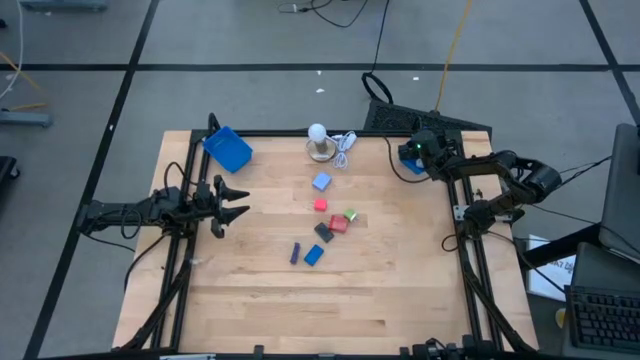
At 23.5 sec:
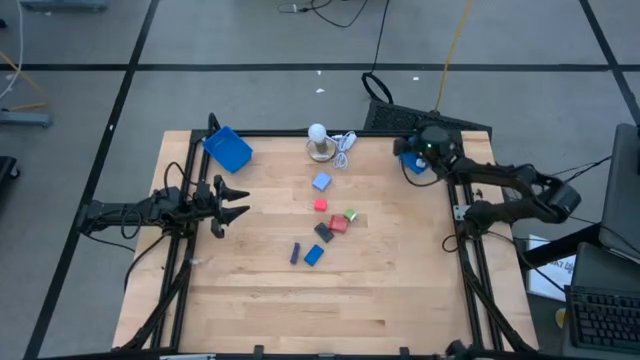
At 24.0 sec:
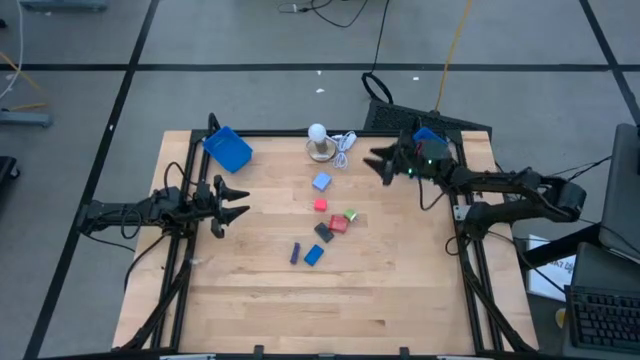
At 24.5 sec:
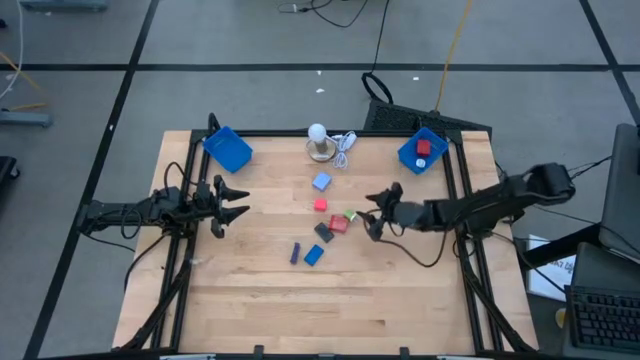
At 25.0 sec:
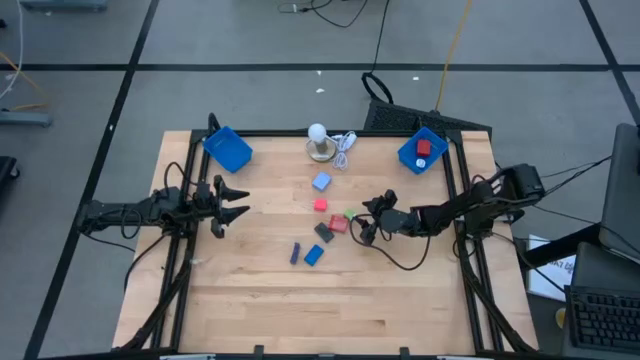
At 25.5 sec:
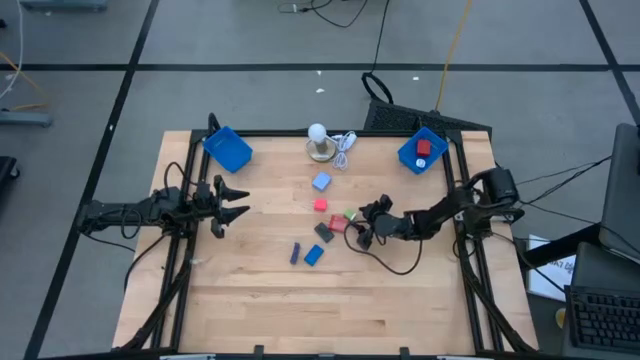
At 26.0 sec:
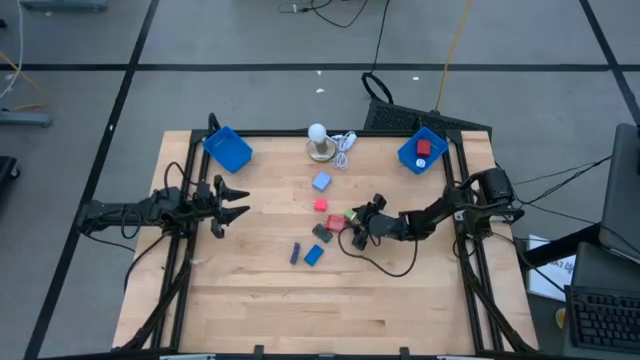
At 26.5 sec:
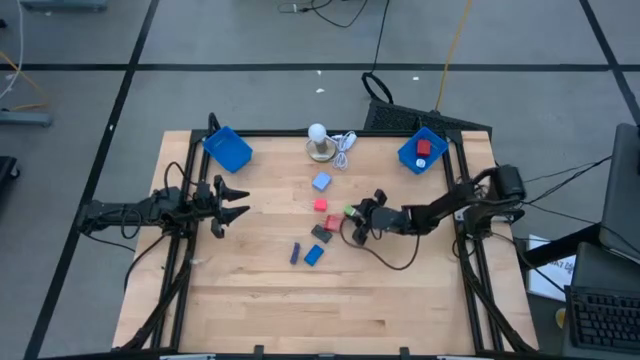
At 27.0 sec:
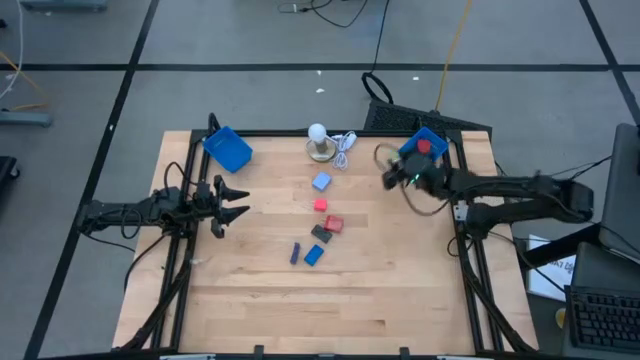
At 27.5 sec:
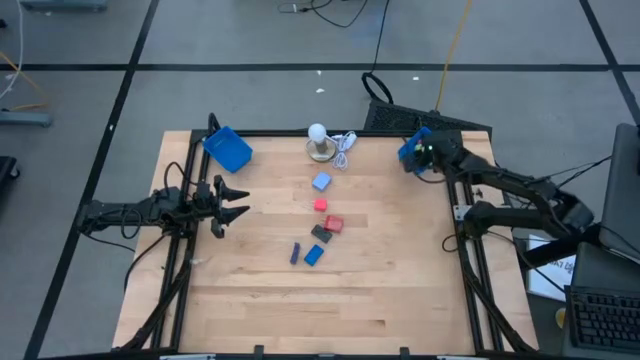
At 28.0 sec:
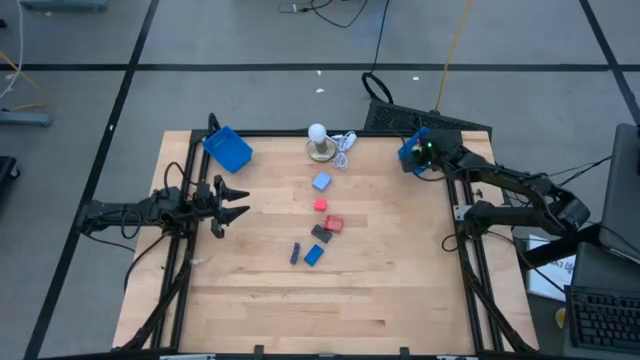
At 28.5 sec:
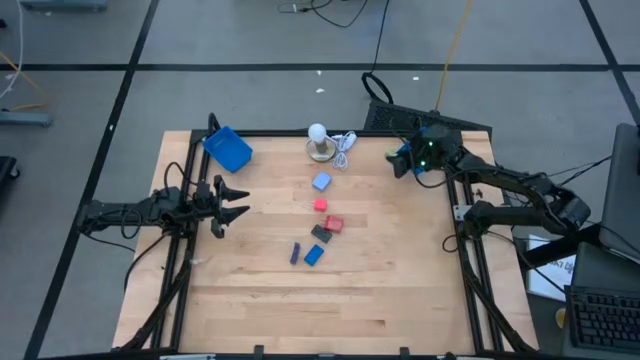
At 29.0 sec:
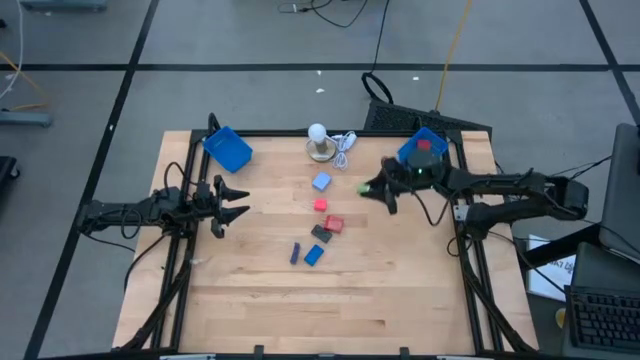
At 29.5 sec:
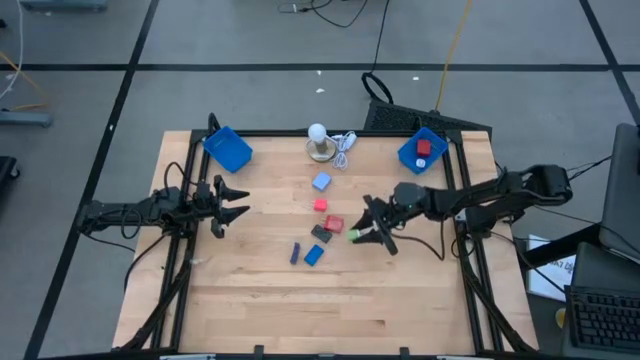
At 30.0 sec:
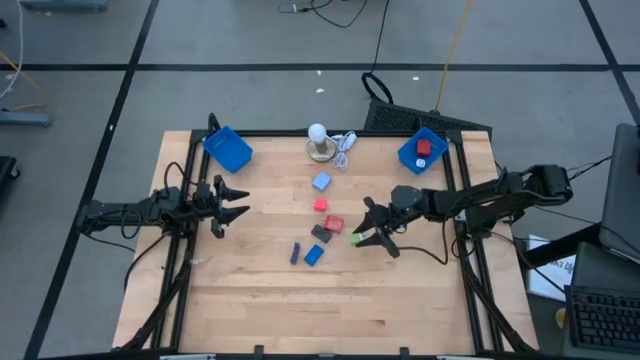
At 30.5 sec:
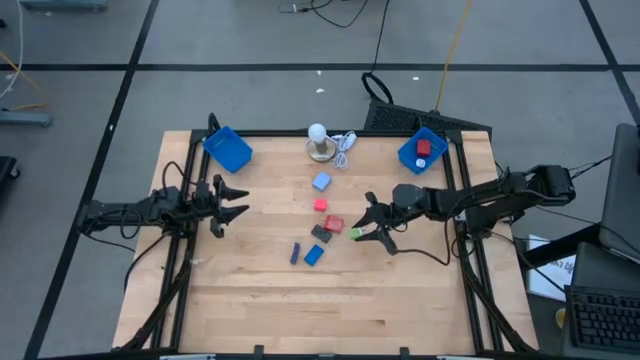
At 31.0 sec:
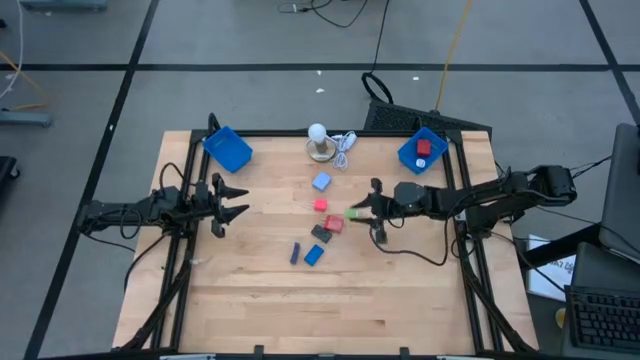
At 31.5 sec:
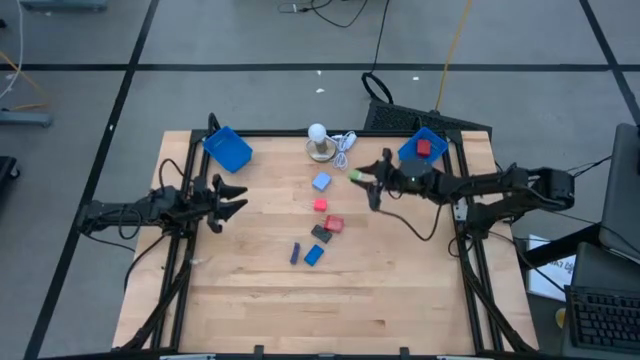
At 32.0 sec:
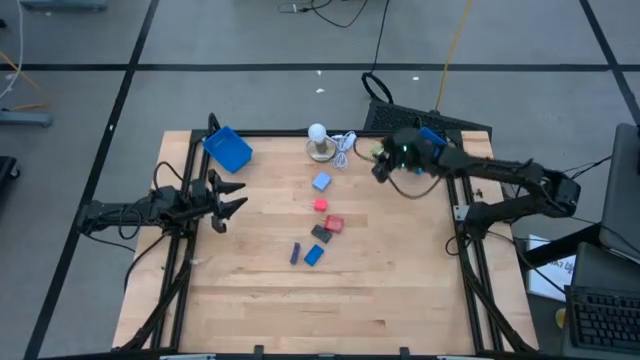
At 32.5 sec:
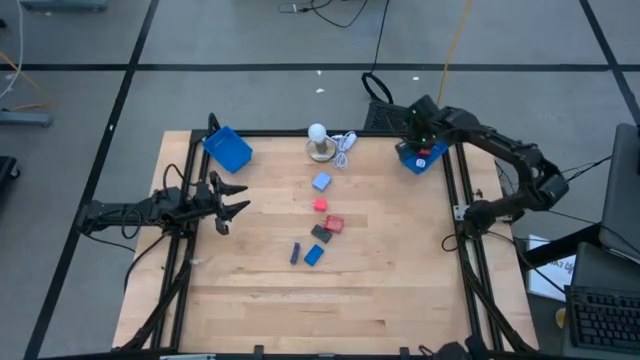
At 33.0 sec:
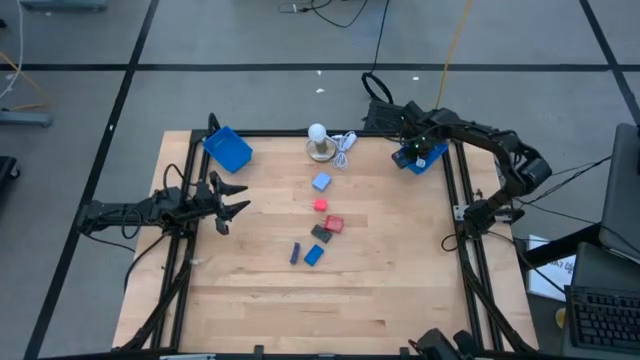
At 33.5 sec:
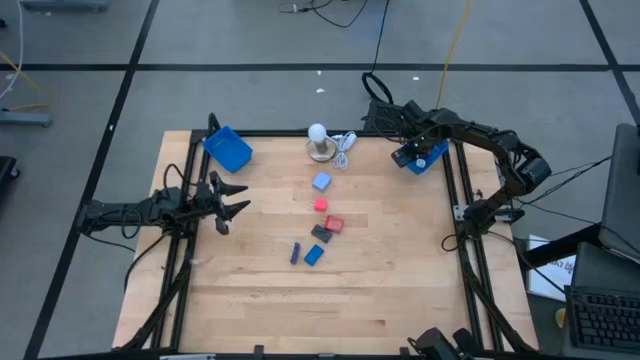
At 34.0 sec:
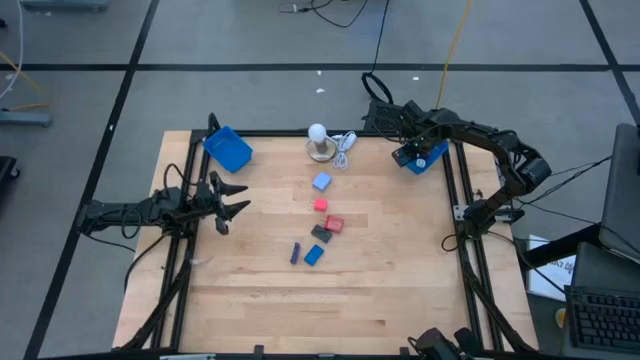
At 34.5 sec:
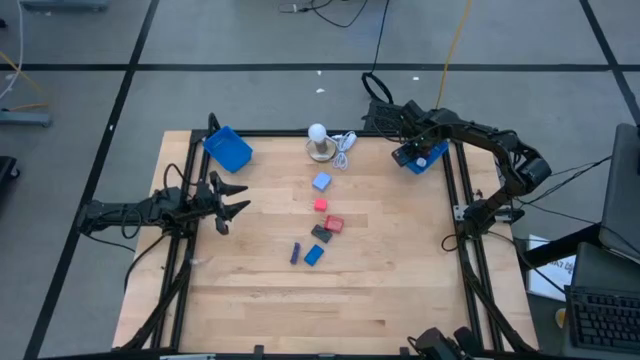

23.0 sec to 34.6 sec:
Task: Pick & Place Office items
Put the green charger adapter into the right blue bin

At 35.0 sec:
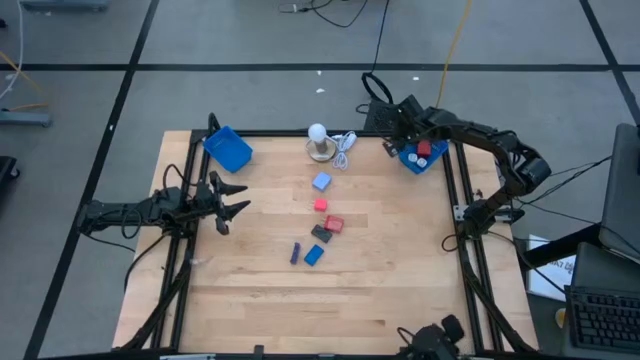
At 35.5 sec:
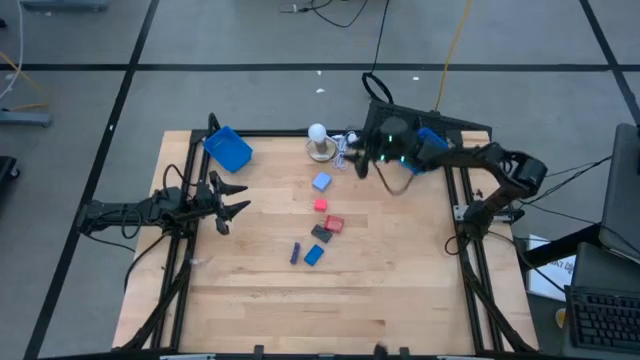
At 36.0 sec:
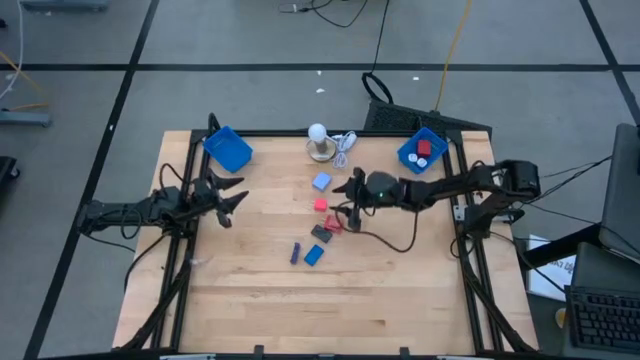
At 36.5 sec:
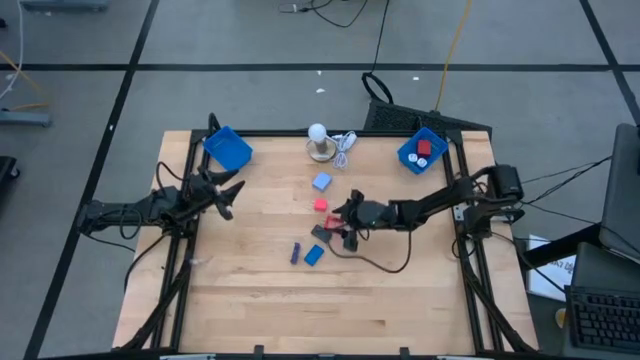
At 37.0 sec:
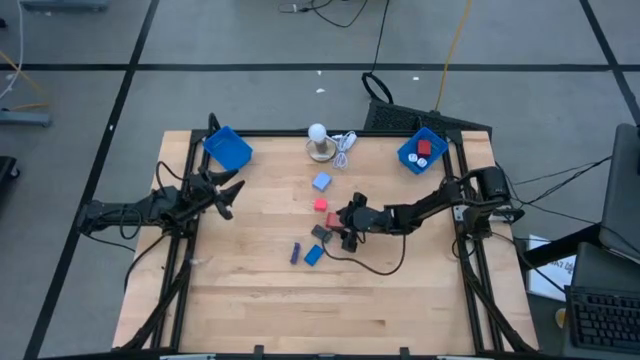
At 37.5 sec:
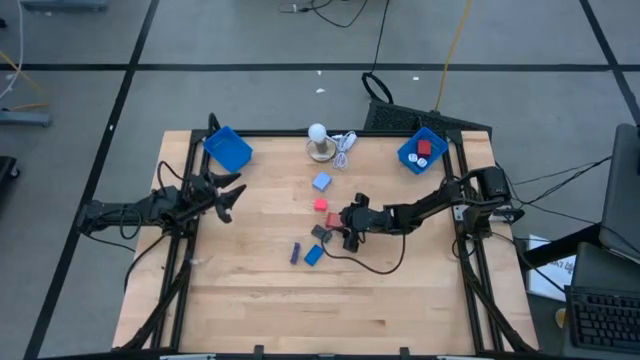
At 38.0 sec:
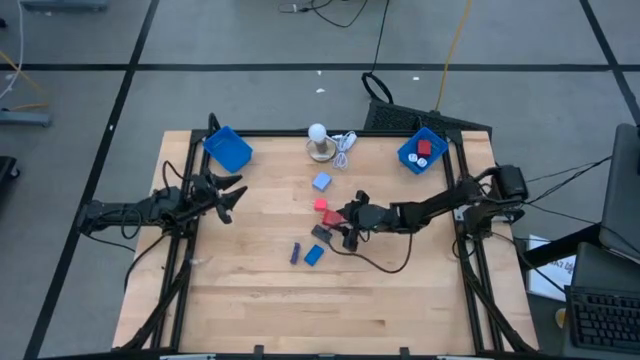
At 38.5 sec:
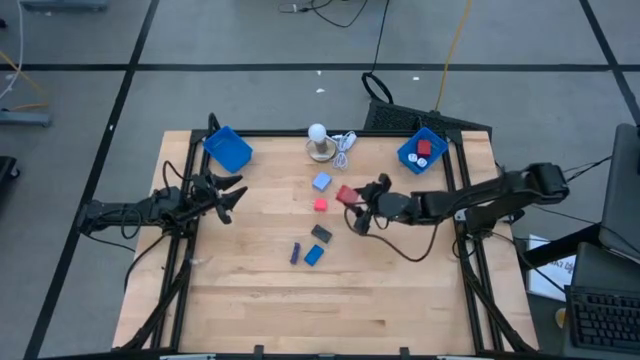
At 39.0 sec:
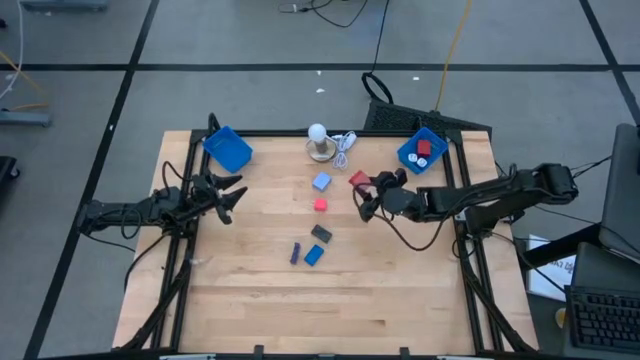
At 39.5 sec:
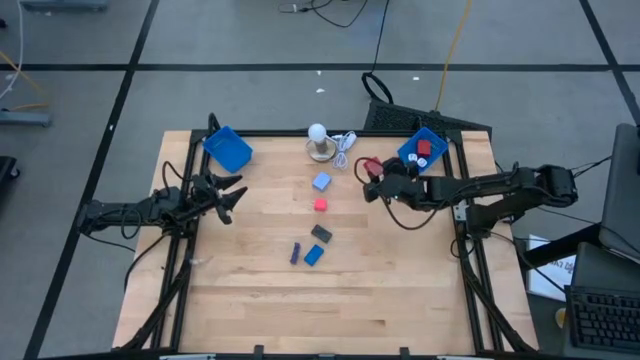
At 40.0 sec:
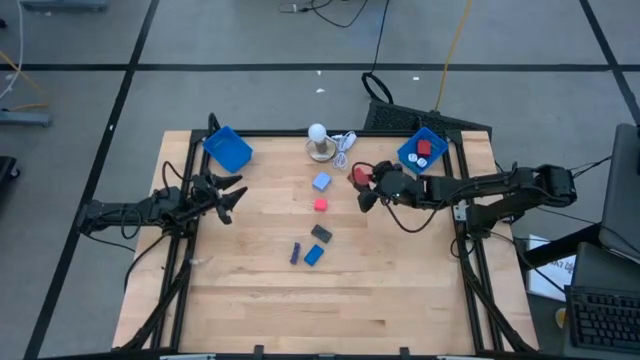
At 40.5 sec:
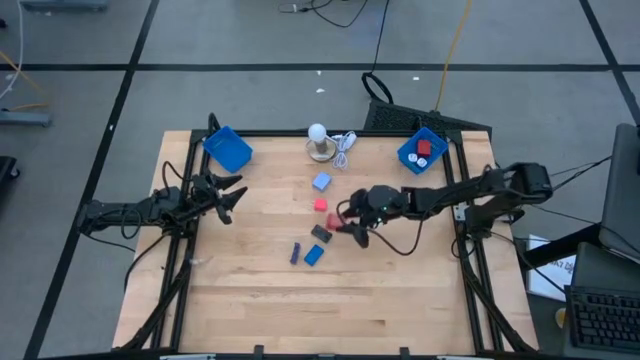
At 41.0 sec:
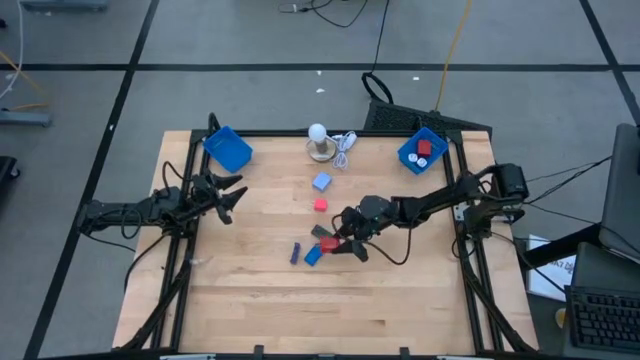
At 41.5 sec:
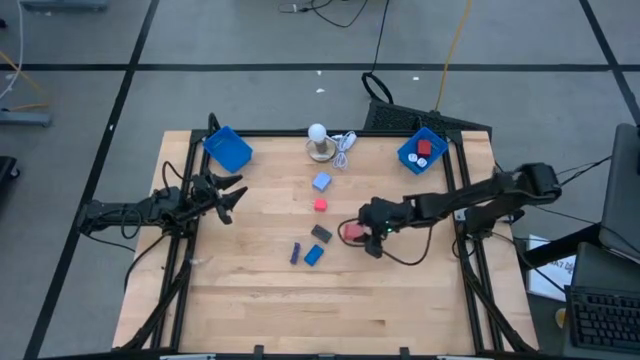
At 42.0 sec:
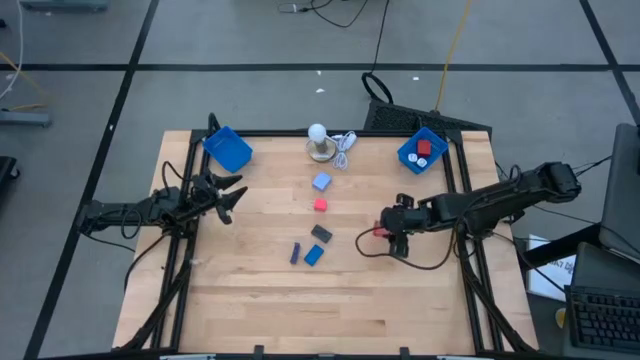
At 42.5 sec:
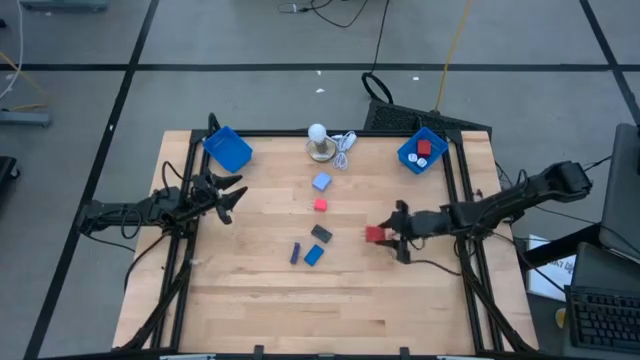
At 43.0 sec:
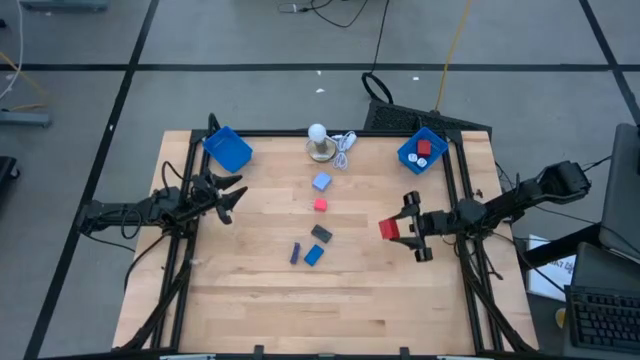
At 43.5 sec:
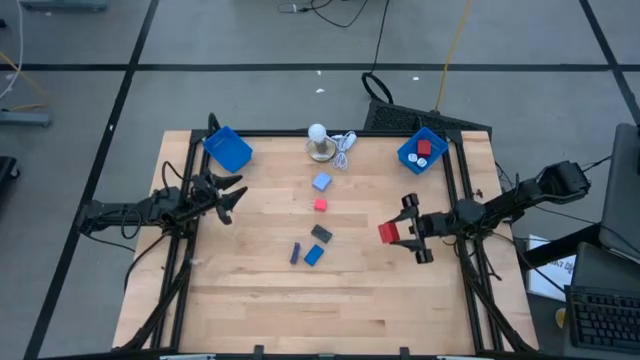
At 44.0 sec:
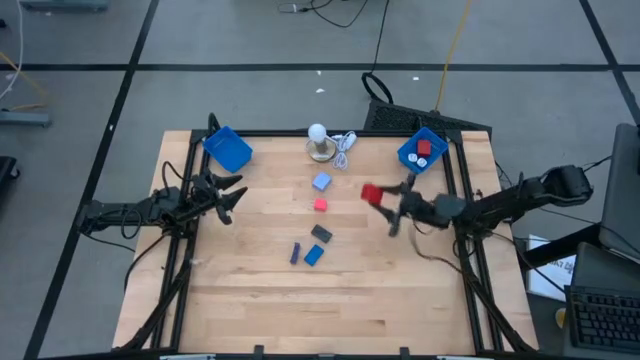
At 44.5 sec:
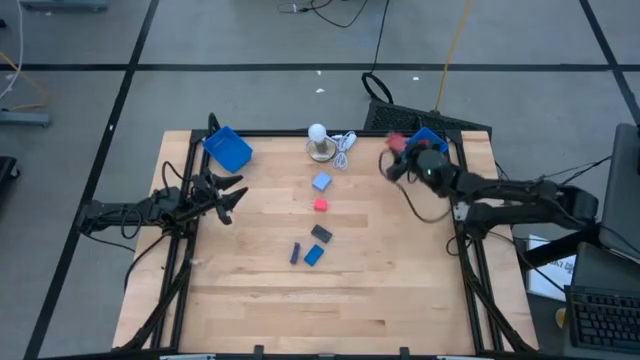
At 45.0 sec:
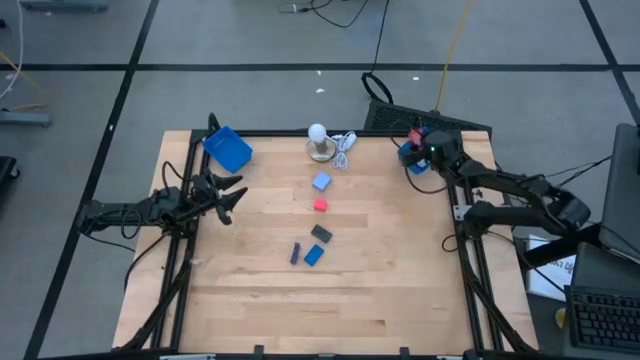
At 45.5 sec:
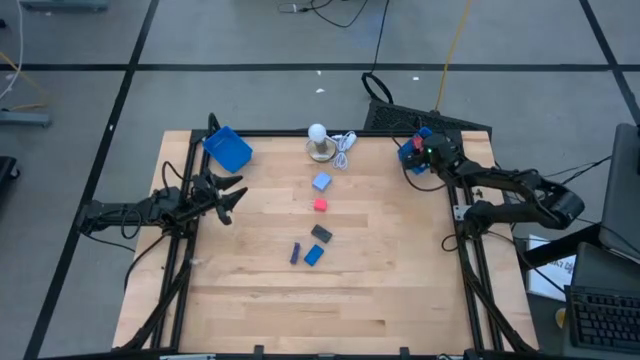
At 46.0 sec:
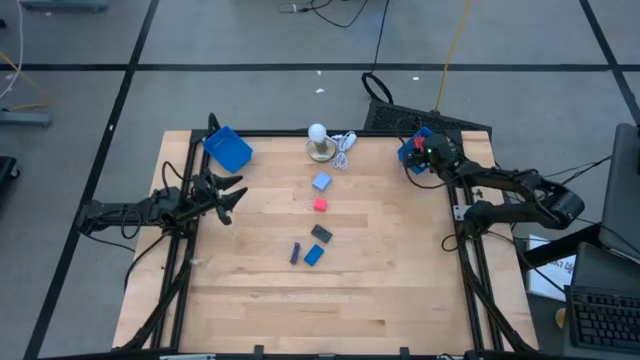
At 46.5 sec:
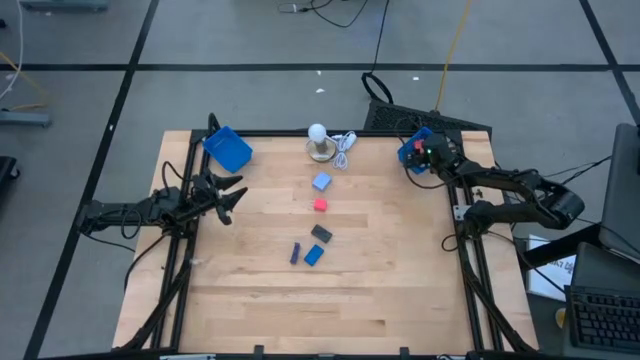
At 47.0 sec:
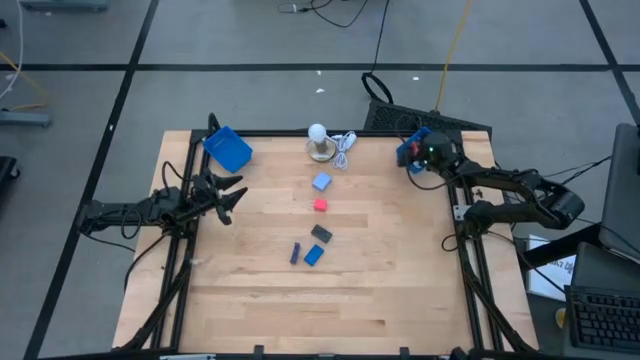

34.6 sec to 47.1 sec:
Put the red charger adapter into the right blue bin
